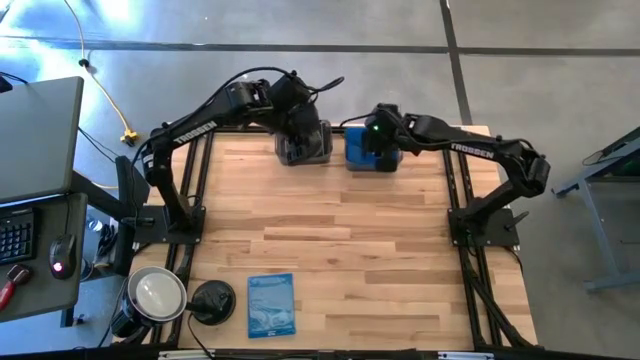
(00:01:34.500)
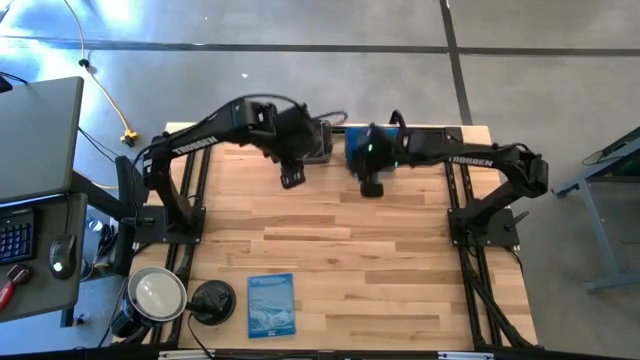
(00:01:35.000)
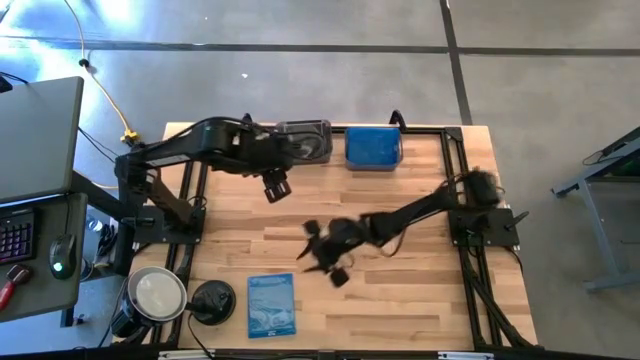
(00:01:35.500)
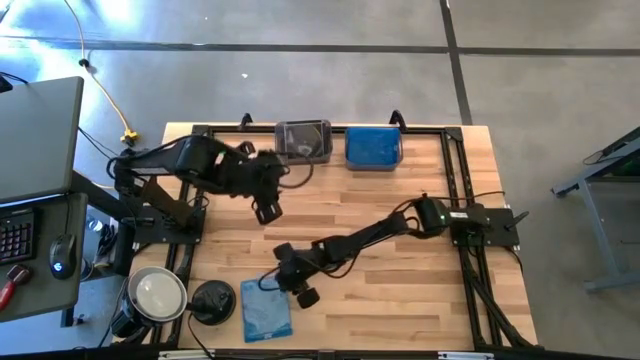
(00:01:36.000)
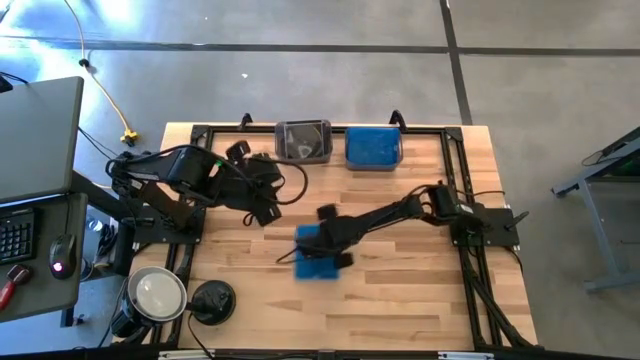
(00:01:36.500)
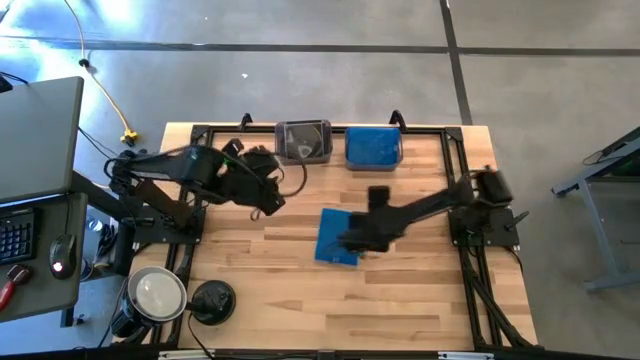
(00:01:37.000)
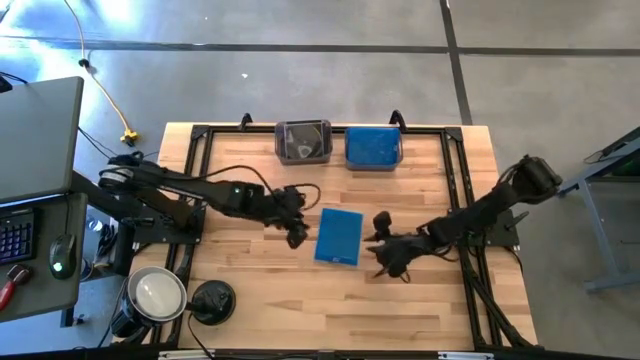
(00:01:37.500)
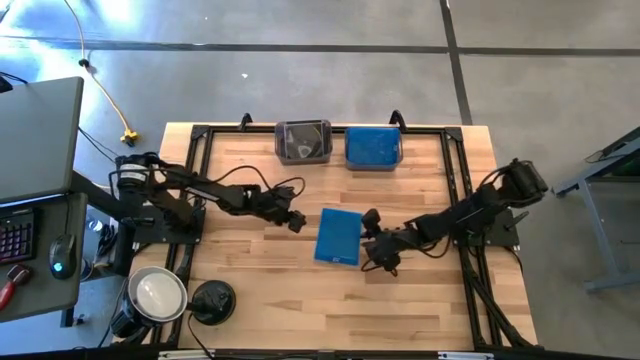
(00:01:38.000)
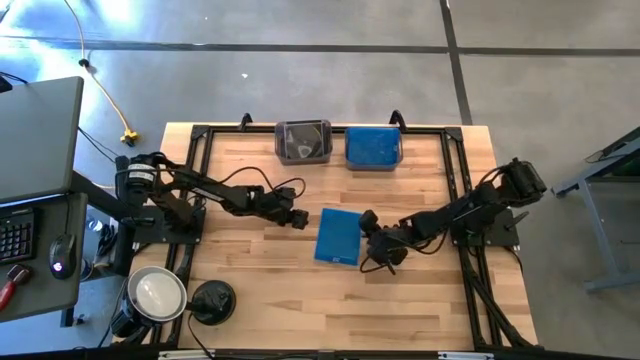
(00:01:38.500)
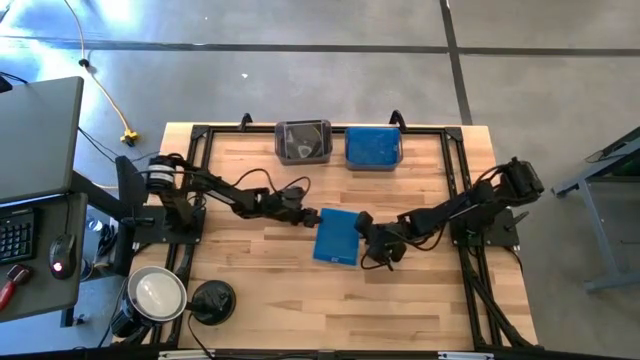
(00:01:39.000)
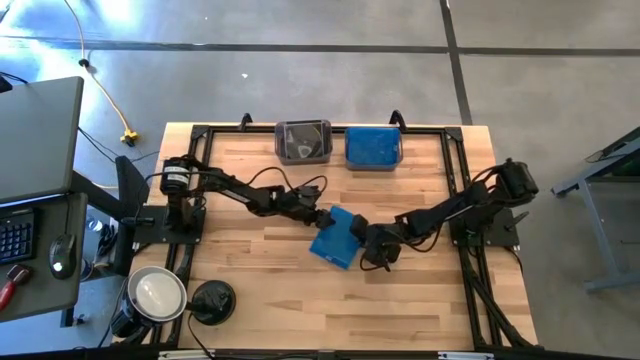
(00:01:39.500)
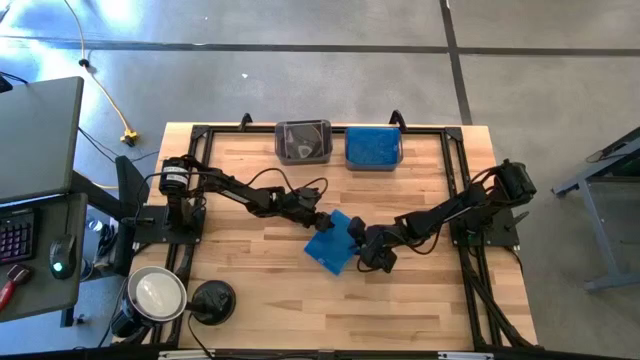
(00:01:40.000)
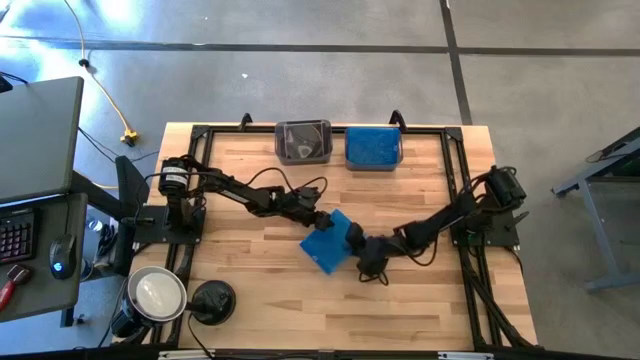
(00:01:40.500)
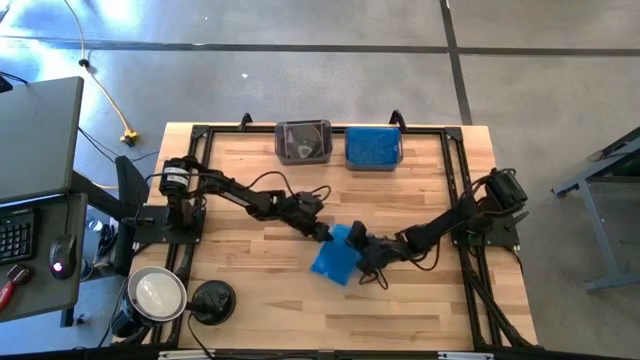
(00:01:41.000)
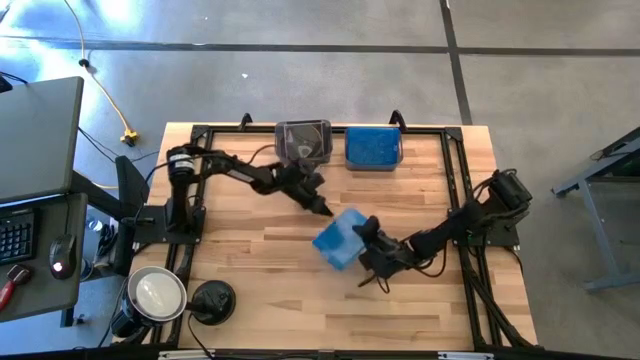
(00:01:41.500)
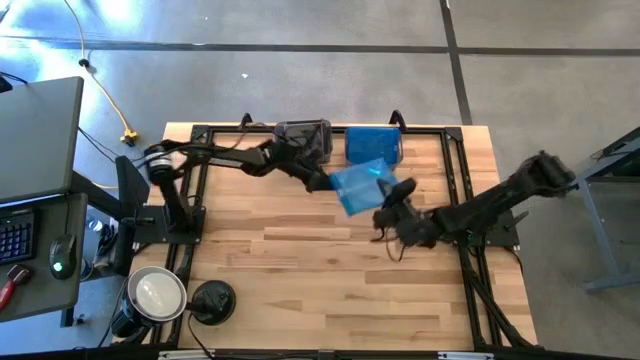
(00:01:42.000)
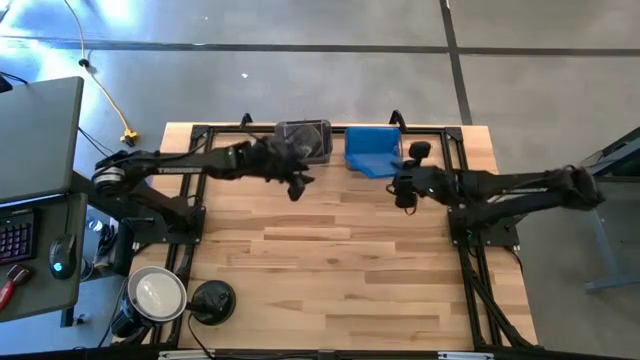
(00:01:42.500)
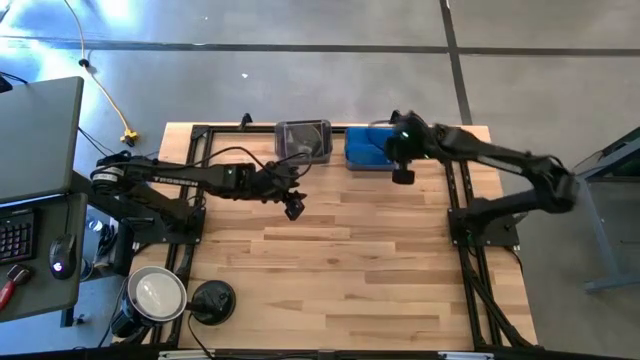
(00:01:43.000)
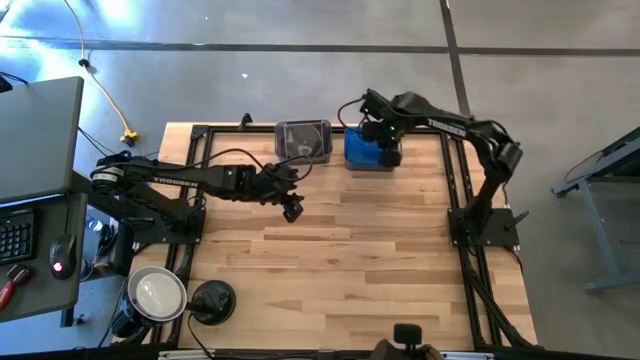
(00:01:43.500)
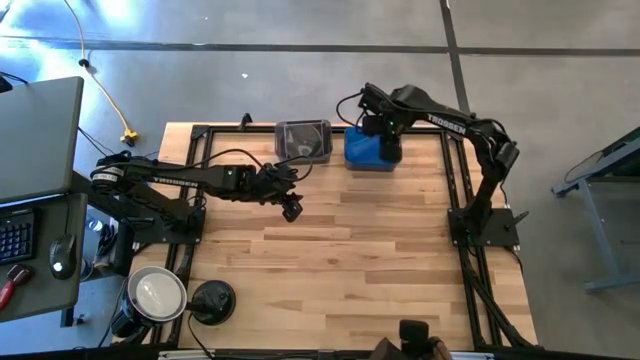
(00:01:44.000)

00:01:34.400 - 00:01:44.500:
Task: Pick & place jewel cases by type
Put the blue cd case into the right black bin

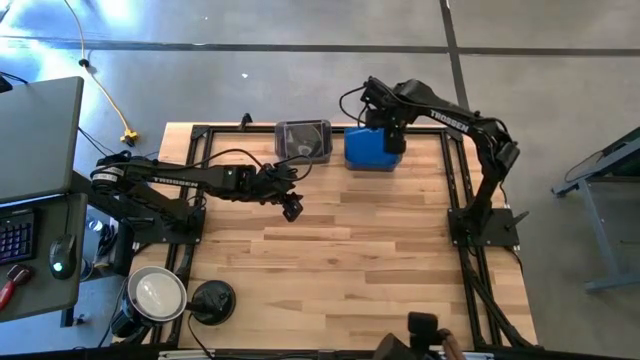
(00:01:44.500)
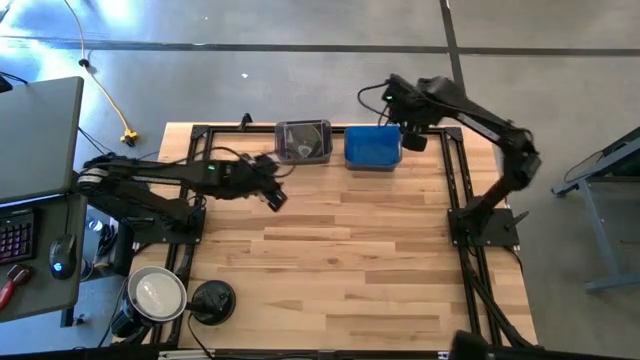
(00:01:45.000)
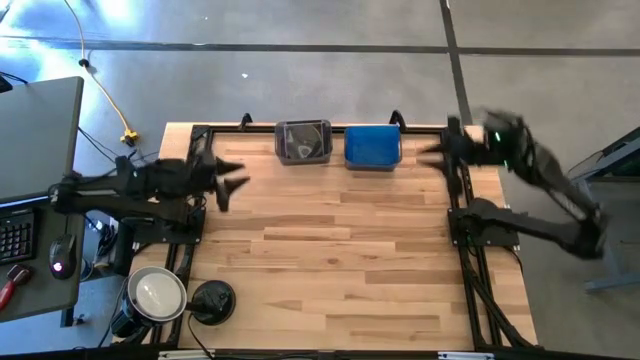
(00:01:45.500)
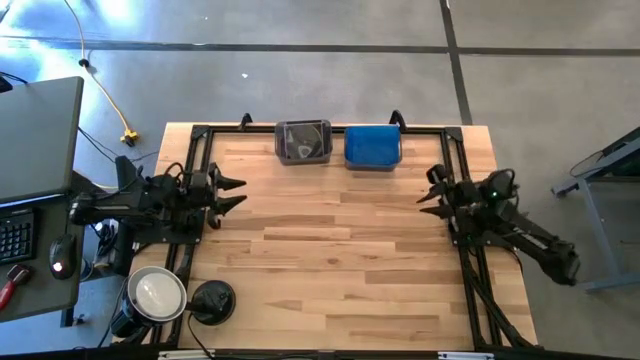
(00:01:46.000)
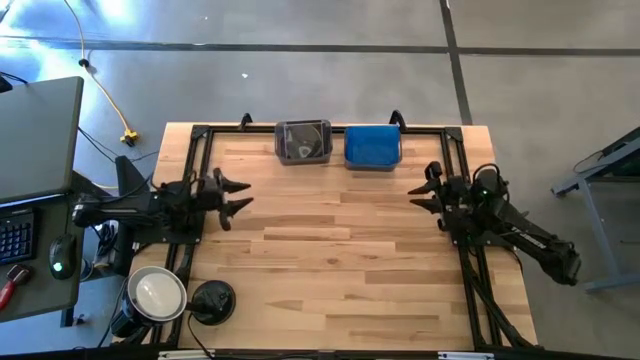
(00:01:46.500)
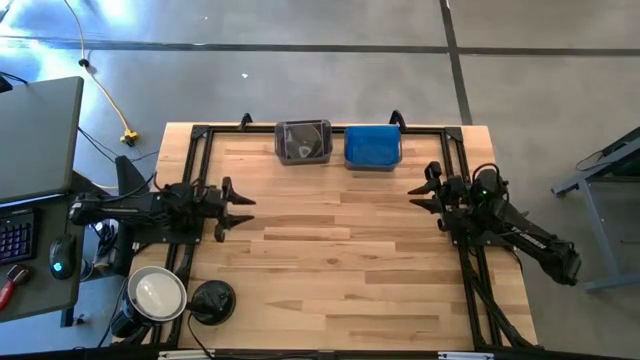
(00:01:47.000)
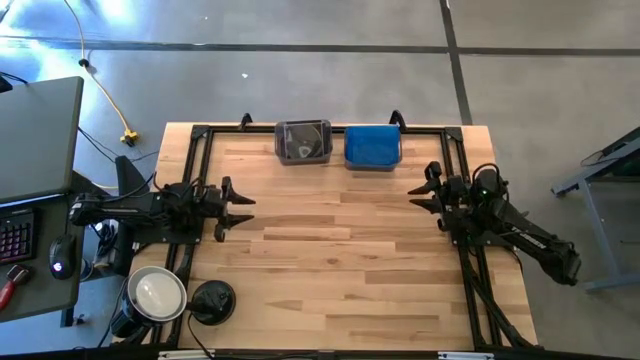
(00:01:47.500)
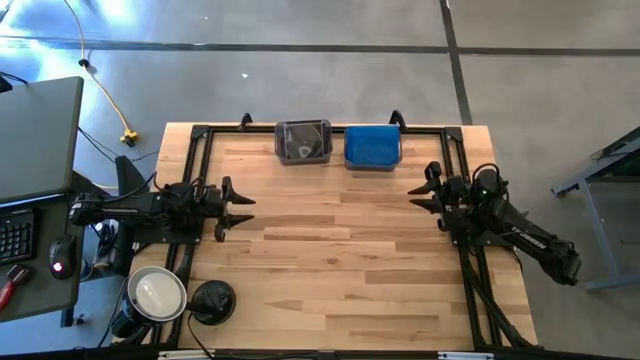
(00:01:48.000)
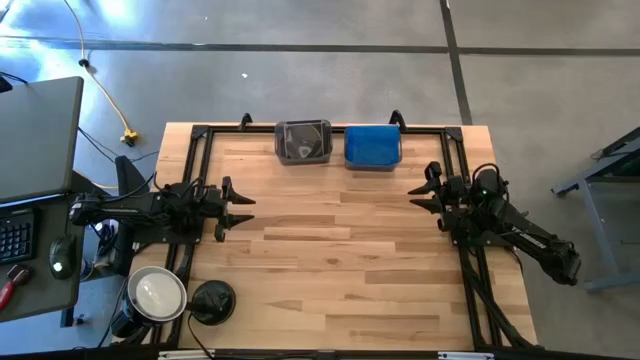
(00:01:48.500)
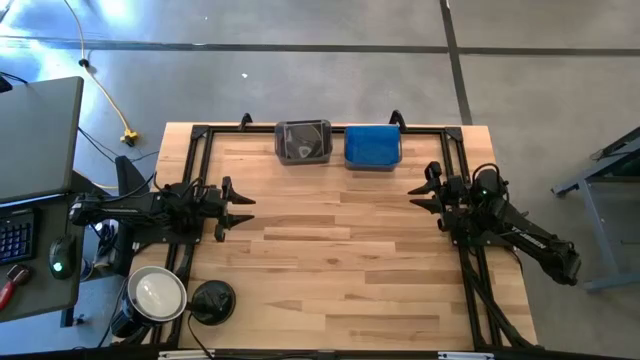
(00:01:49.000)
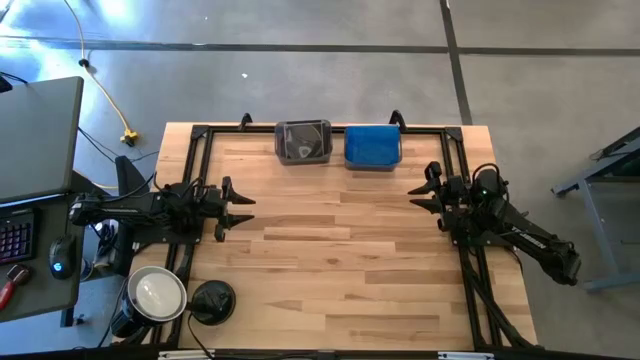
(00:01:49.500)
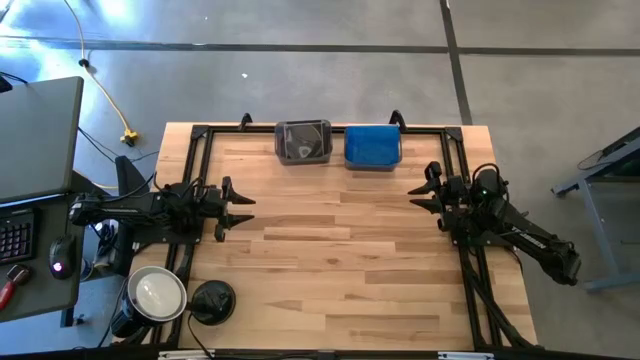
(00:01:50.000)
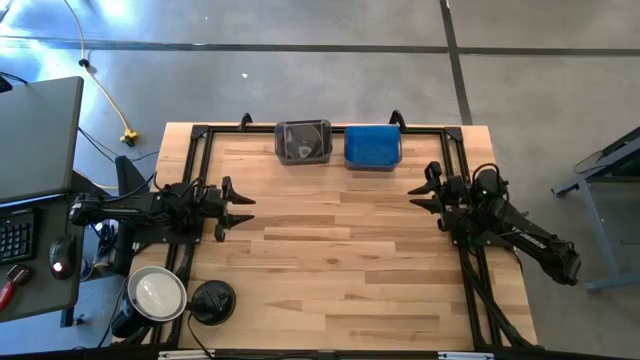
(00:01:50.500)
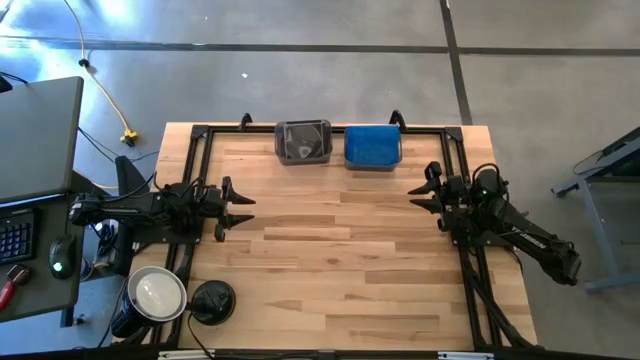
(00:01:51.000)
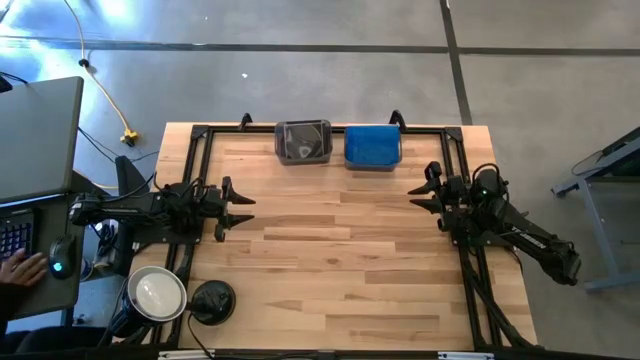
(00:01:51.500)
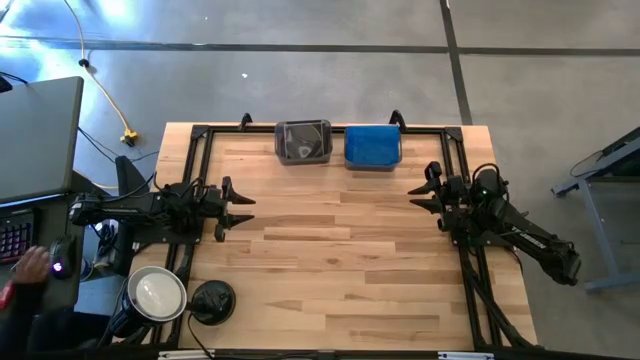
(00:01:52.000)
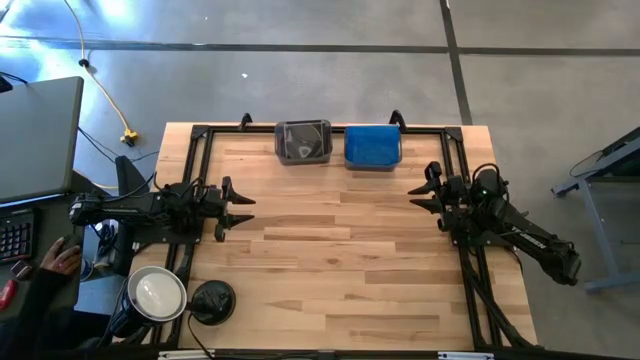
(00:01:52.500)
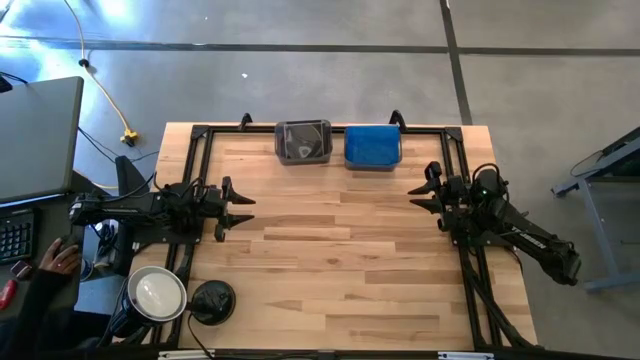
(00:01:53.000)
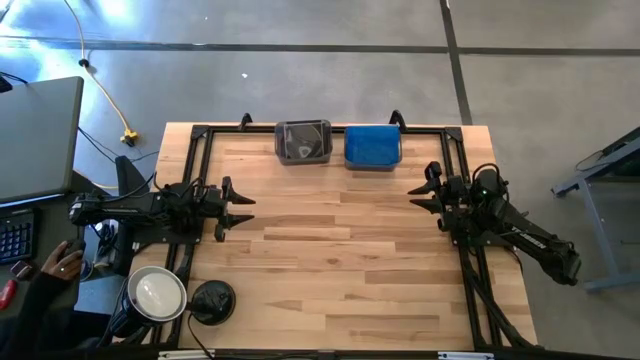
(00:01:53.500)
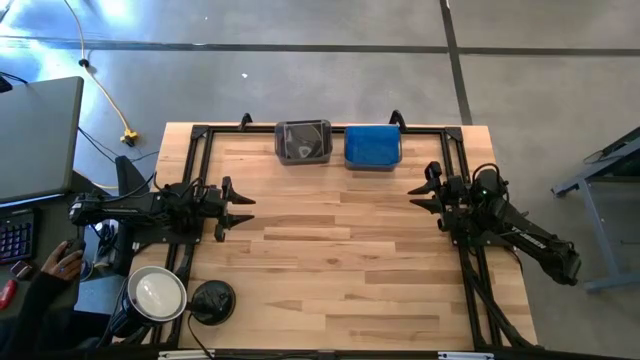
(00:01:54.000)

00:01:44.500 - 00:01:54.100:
Return to Home Position
